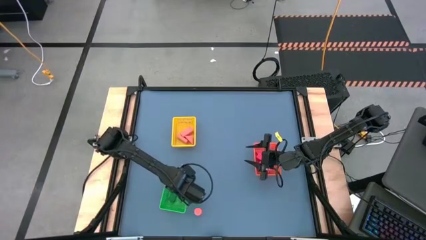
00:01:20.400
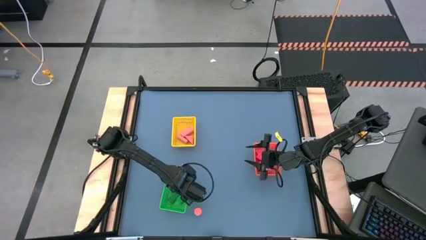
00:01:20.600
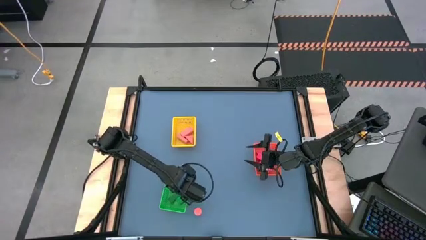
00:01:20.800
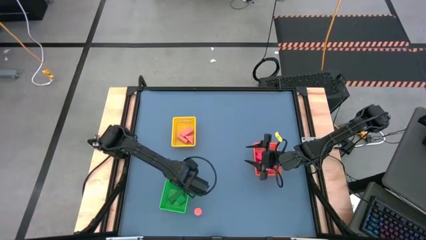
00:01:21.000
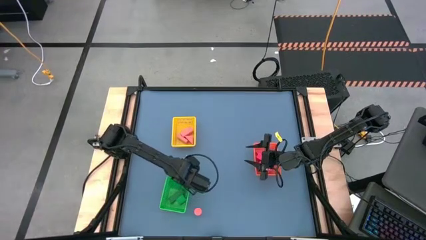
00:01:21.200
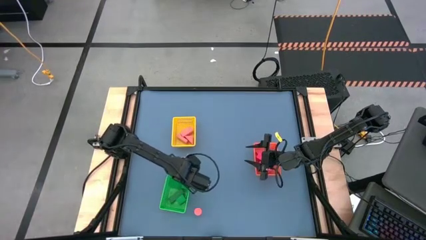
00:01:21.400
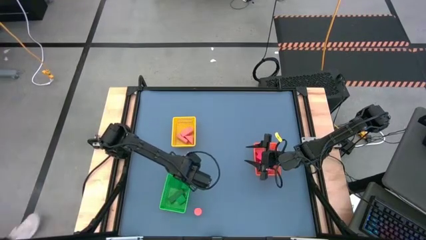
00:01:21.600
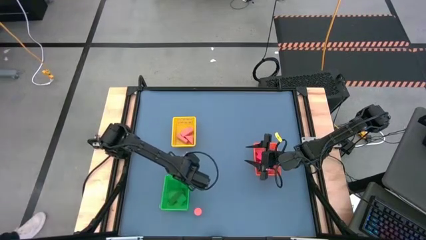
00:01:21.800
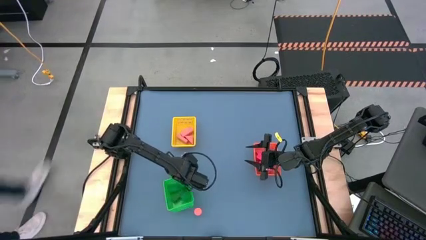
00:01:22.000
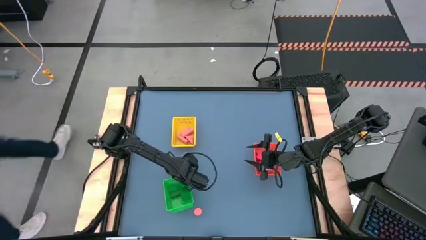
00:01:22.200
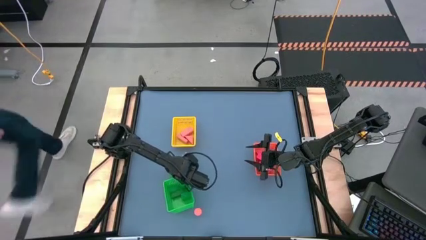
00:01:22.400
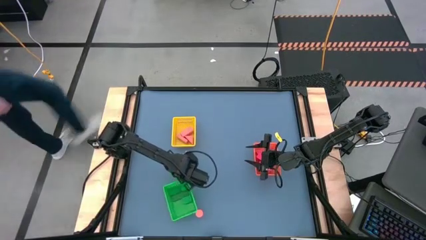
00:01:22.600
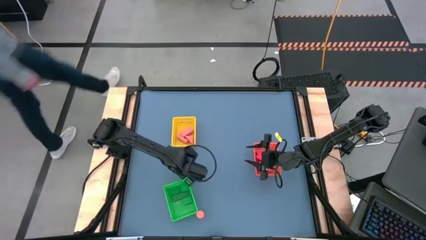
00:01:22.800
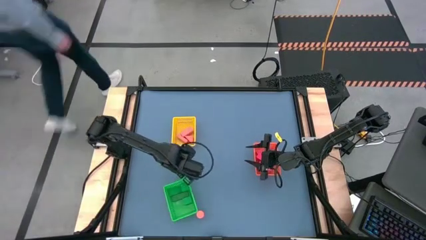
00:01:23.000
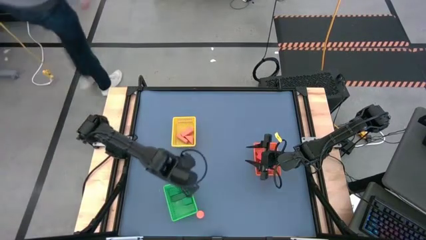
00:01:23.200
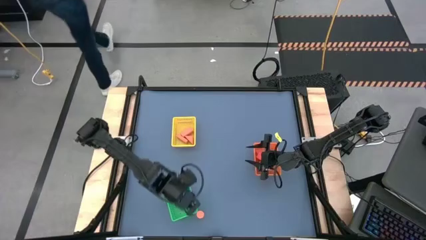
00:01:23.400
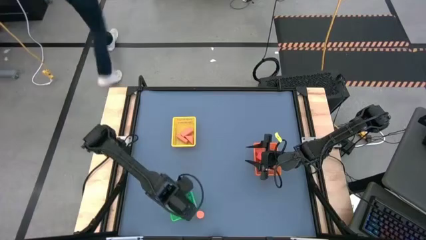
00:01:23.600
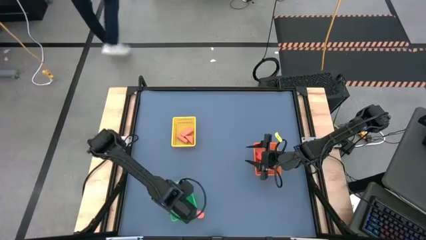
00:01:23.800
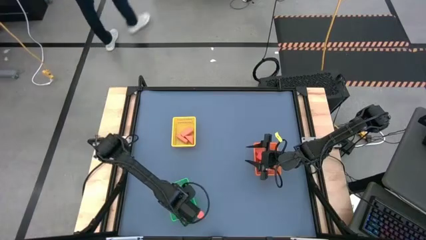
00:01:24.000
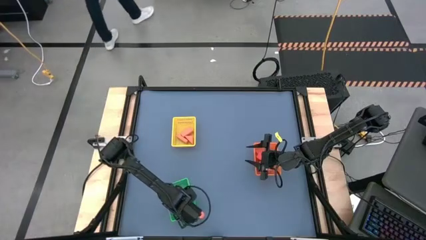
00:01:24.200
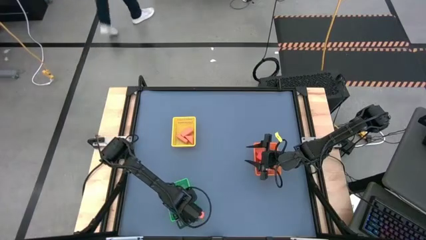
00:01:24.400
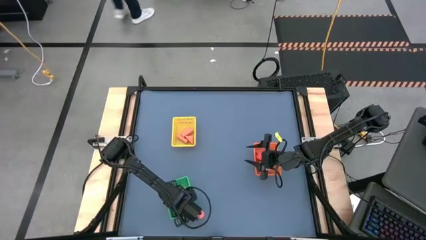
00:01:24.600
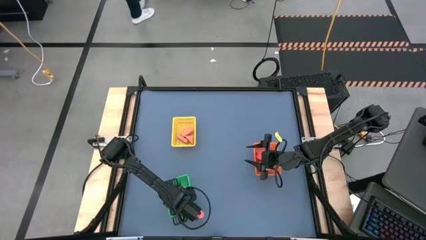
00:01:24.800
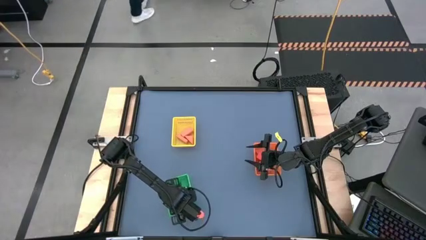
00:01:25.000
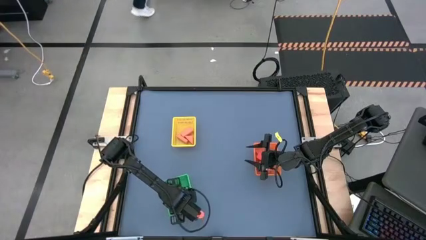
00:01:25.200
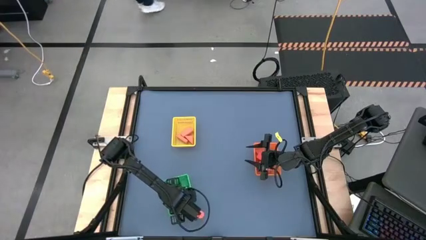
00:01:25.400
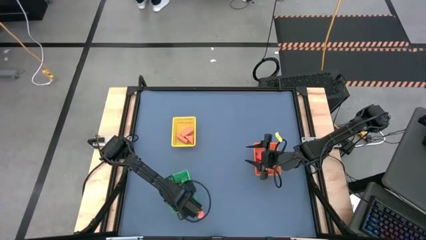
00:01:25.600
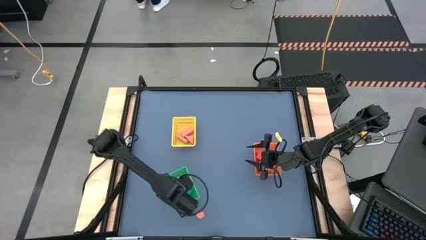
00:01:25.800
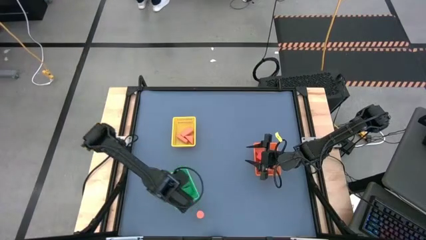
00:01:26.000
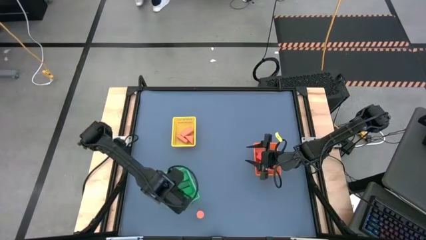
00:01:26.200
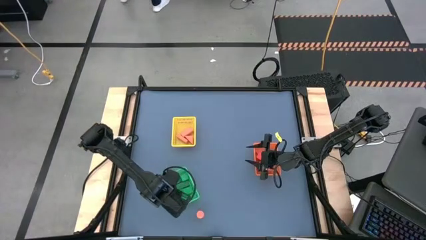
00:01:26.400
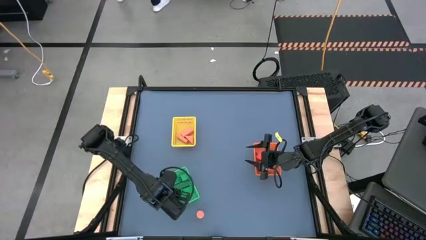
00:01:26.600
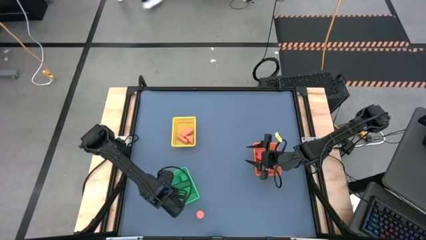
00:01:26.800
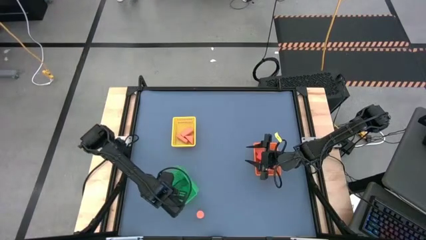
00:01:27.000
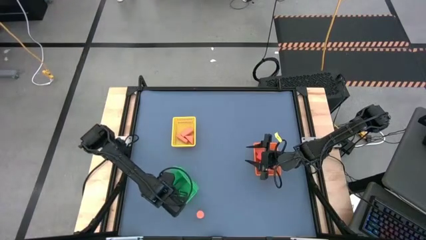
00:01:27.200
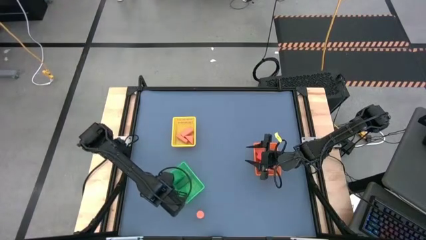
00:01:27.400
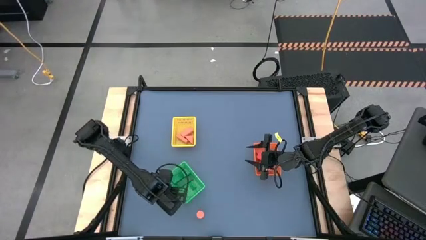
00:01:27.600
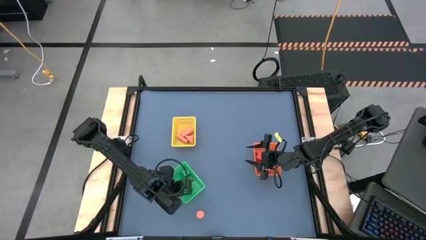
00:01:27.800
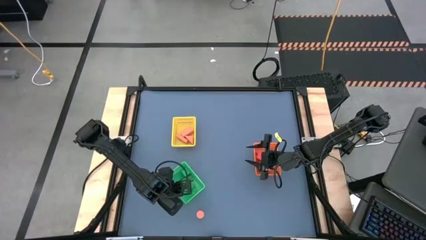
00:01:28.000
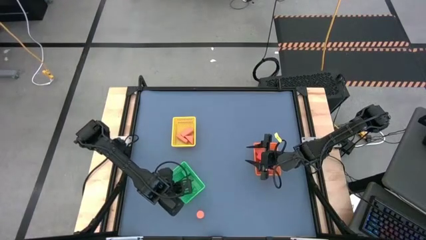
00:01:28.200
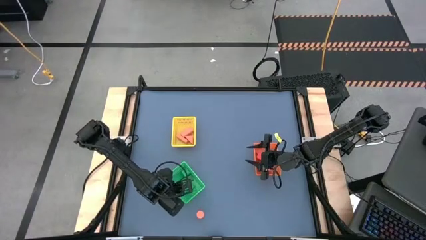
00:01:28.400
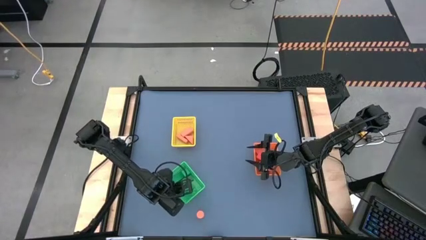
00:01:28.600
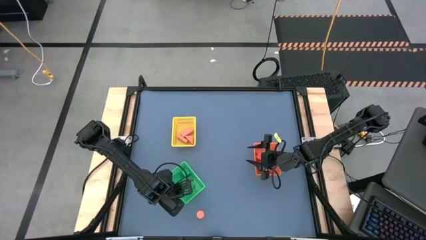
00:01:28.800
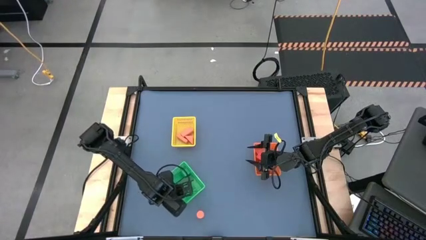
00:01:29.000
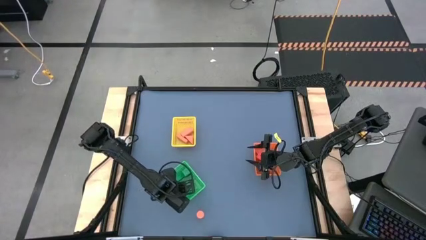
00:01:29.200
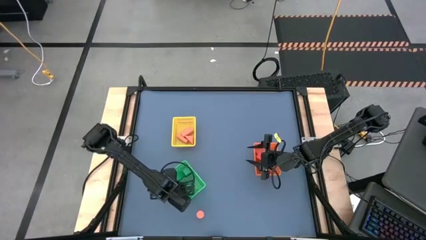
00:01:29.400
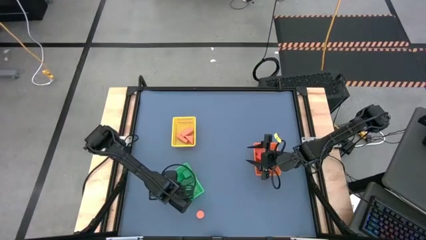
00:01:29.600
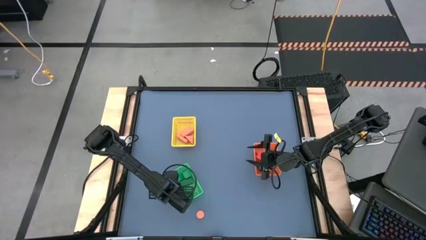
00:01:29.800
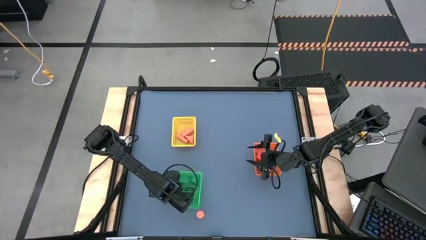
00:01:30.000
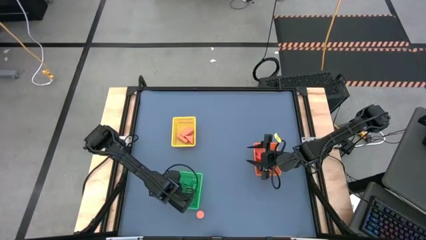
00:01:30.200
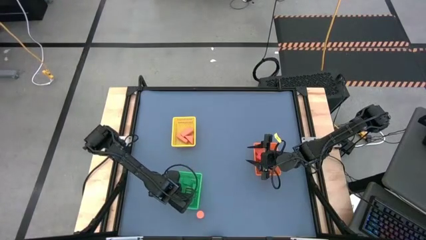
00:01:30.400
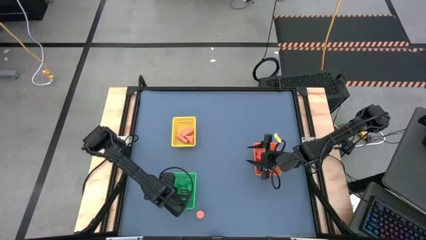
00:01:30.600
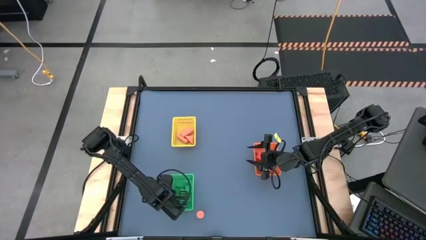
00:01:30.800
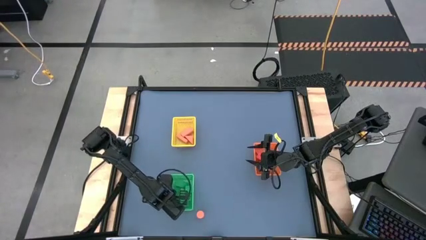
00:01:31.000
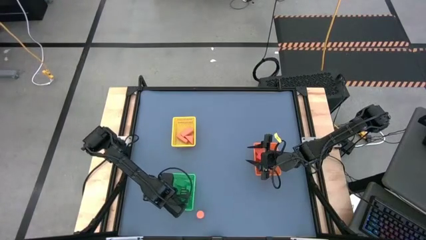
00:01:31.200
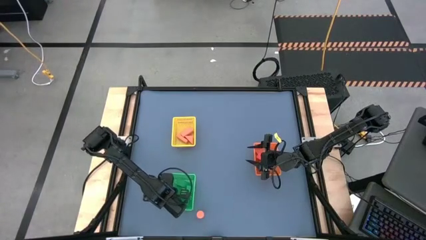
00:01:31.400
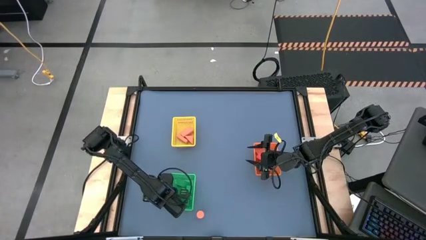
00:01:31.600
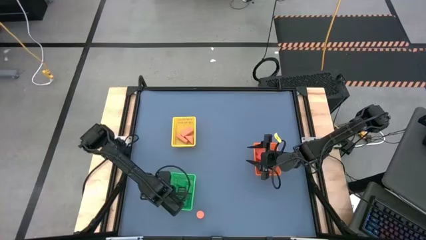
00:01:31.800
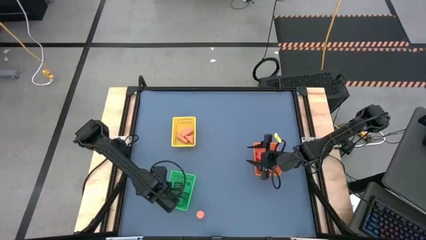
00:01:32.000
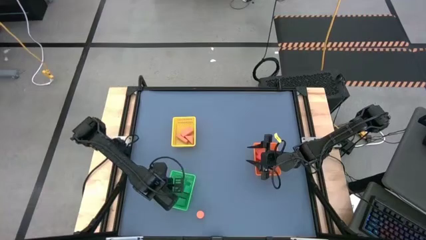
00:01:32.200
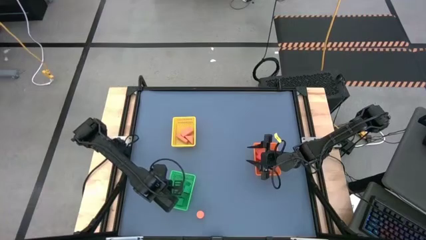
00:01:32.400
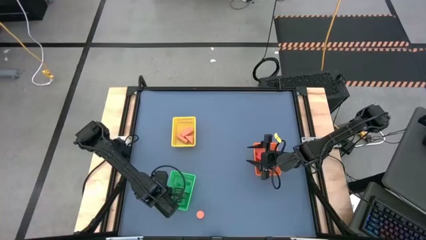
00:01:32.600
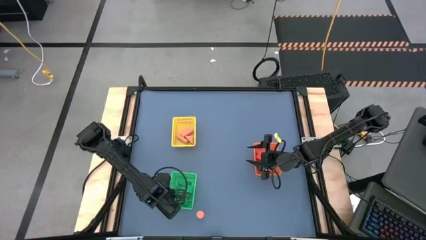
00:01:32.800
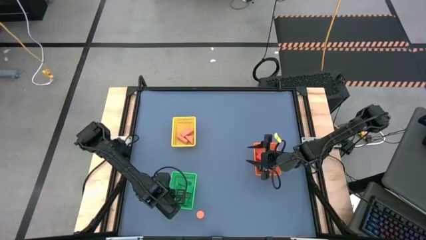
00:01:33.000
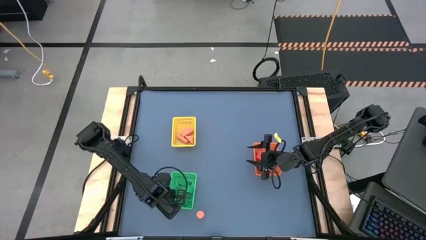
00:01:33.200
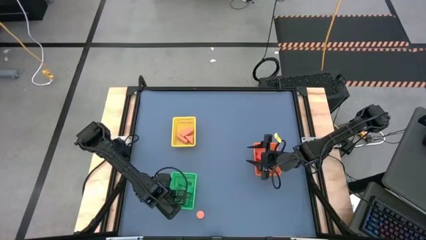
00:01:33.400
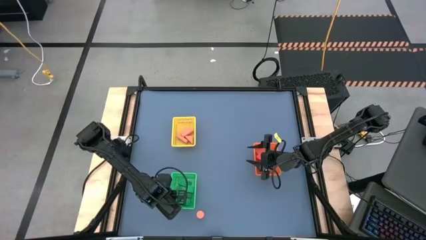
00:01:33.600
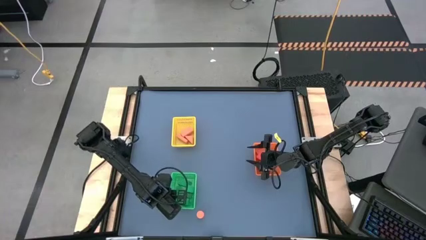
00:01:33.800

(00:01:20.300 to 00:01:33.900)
Task: Sort & place blocks by color
Adjust the green bin

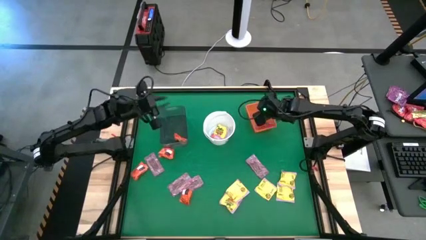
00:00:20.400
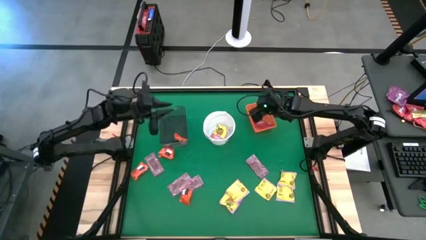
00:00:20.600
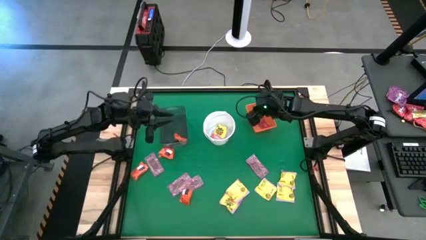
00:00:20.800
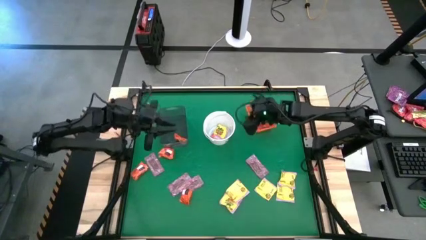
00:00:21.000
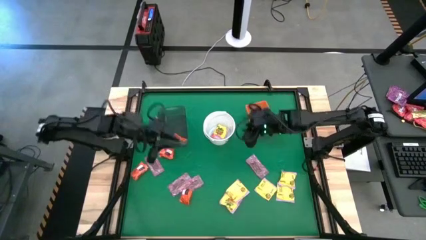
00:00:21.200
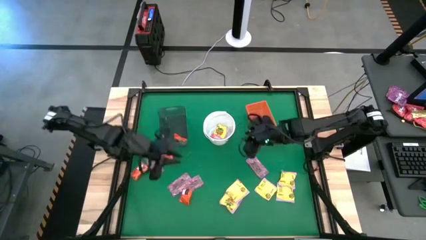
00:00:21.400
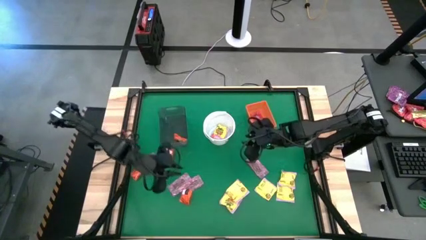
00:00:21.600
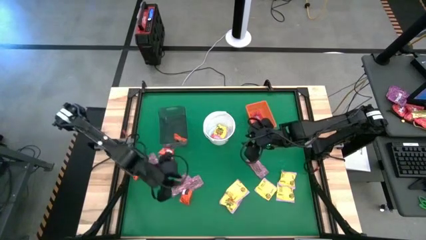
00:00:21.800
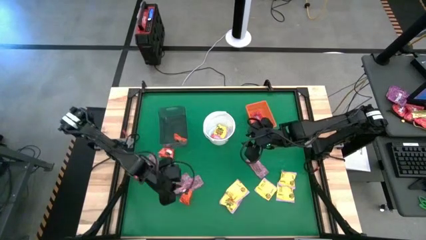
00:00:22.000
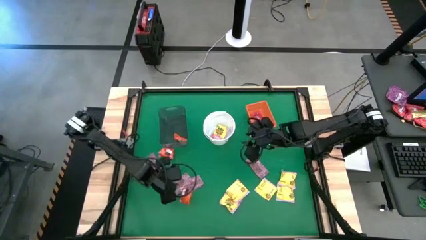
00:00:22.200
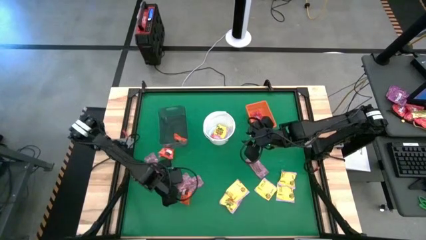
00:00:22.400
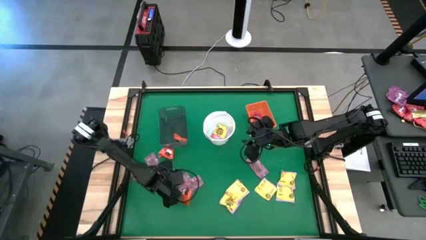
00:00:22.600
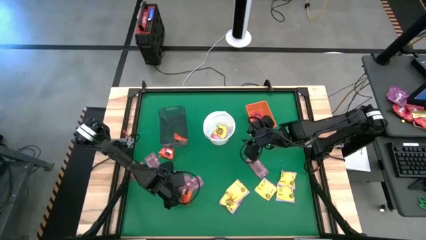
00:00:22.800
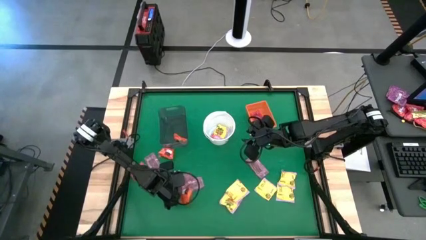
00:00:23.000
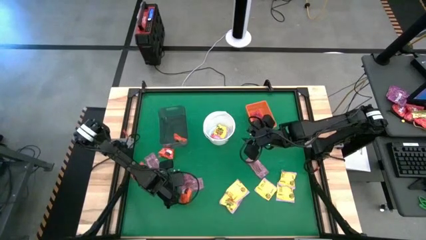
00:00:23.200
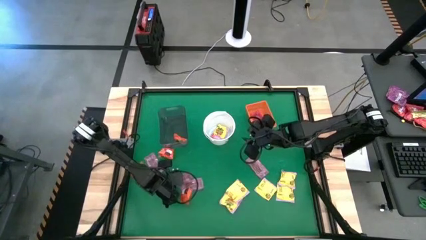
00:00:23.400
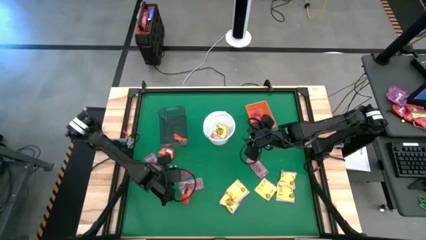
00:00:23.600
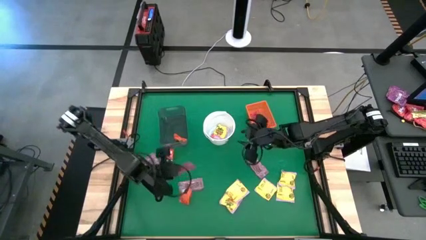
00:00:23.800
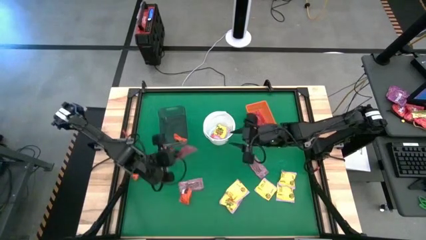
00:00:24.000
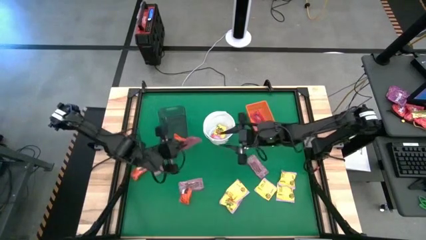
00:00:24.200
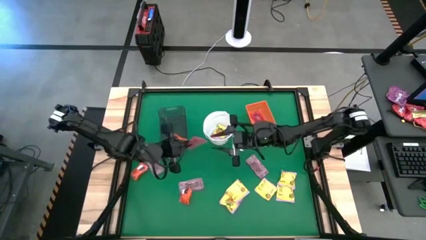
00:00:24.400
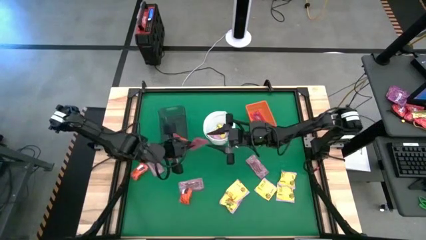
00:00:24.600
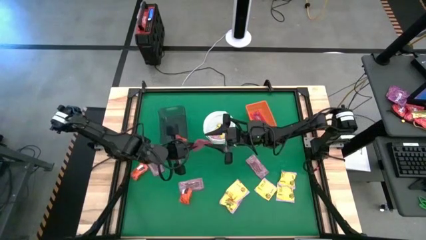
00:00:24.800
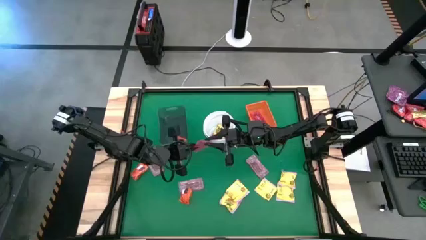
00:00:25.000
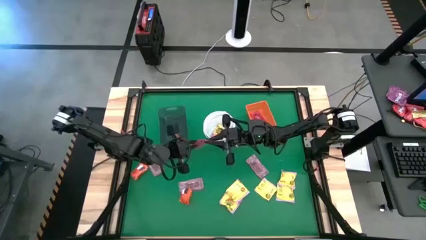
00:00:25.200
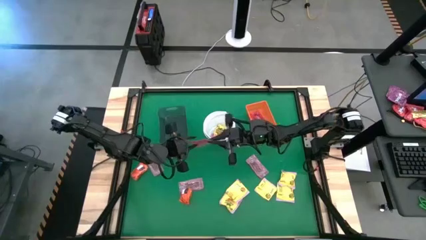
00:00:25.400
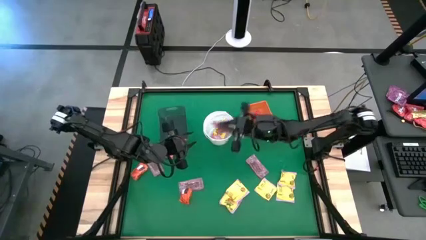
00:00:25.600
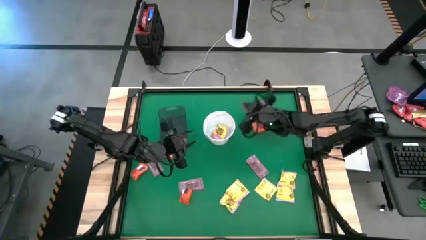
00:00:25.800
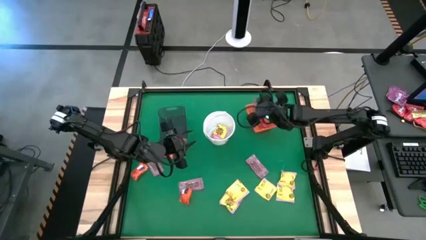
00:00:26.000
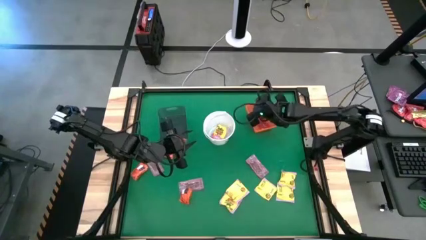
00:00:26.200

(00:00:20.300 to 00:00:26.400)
Task: Sort candy by brand, put in halloween buckets
Put the red candy into the orange bin
